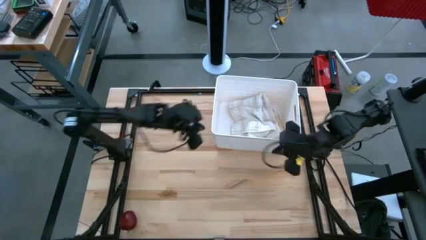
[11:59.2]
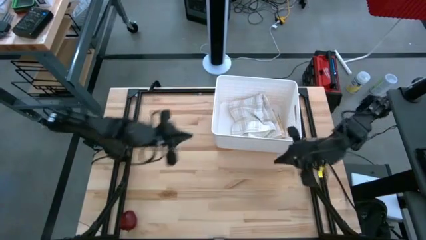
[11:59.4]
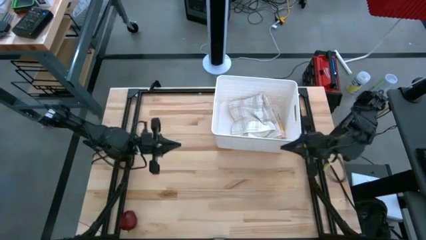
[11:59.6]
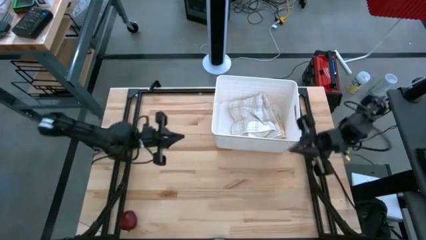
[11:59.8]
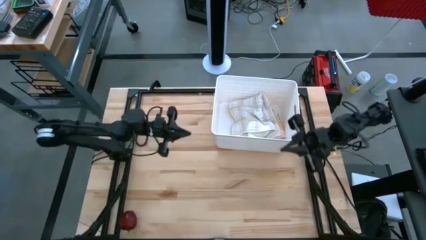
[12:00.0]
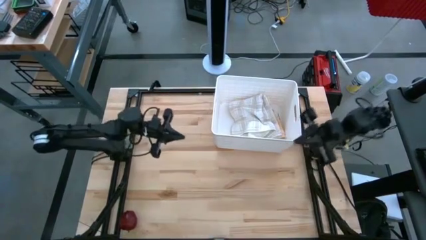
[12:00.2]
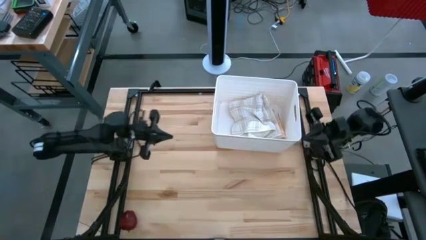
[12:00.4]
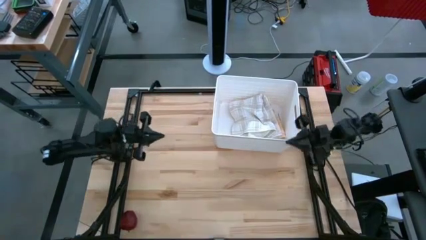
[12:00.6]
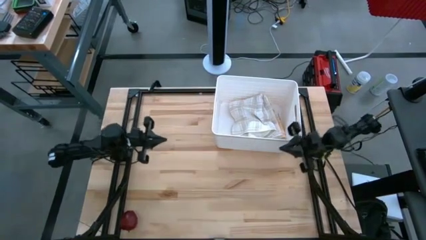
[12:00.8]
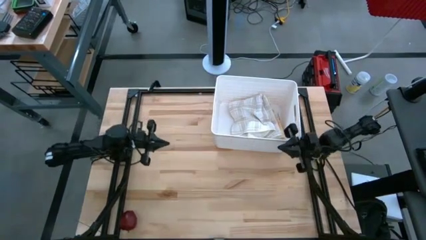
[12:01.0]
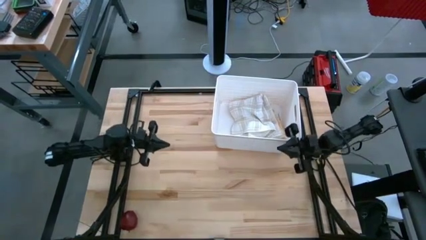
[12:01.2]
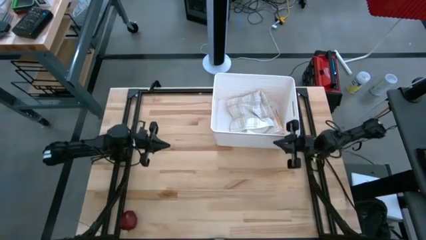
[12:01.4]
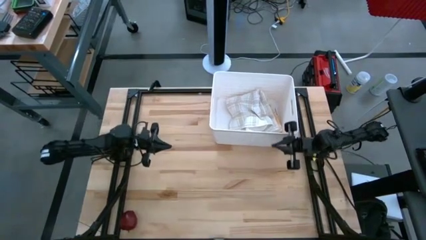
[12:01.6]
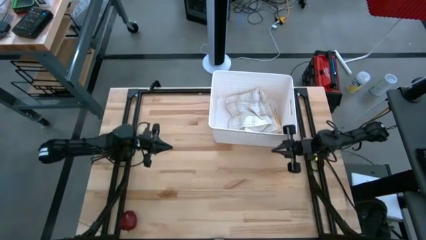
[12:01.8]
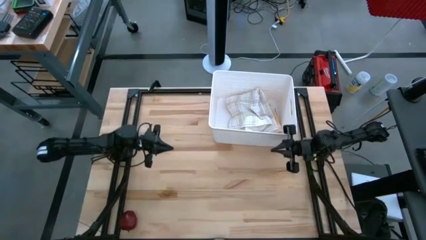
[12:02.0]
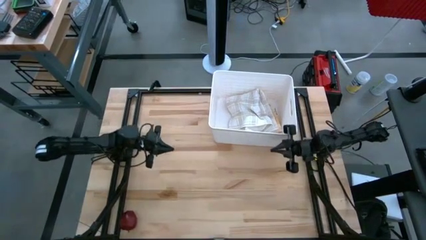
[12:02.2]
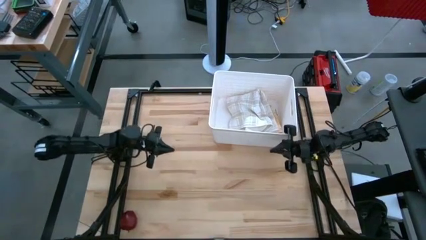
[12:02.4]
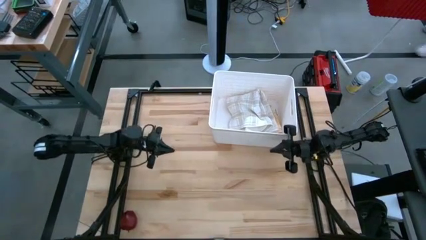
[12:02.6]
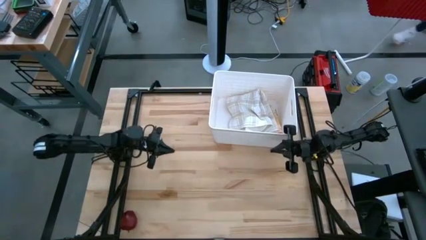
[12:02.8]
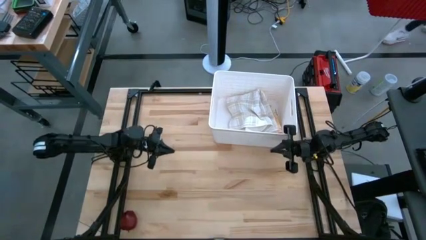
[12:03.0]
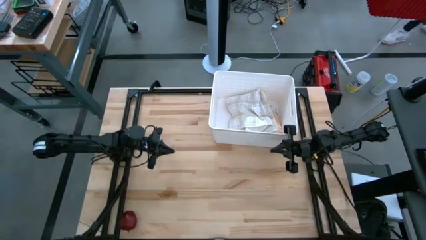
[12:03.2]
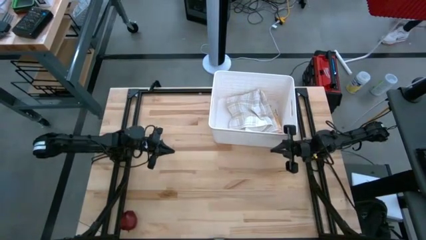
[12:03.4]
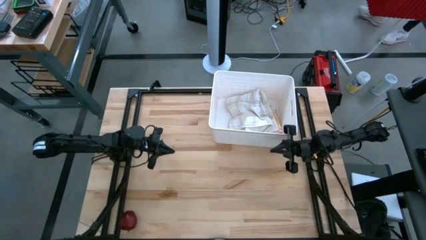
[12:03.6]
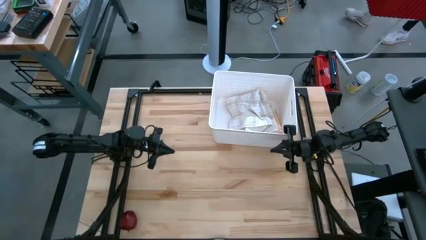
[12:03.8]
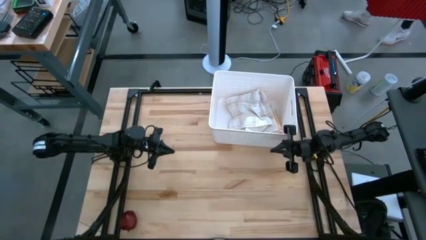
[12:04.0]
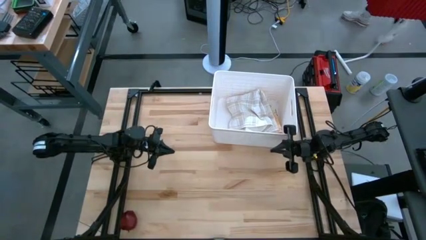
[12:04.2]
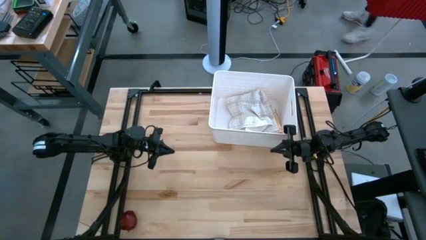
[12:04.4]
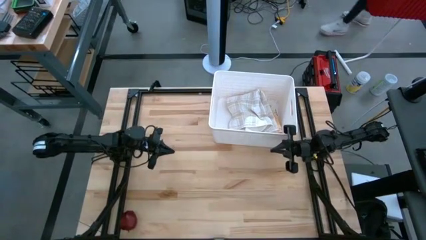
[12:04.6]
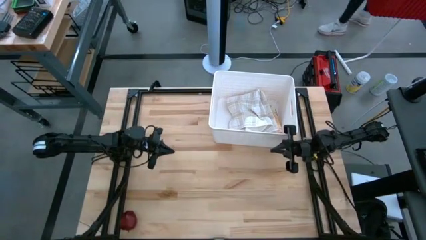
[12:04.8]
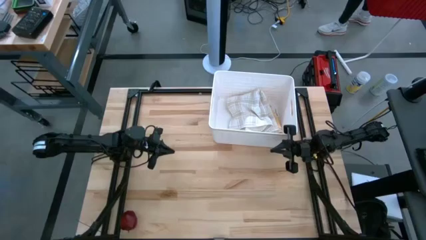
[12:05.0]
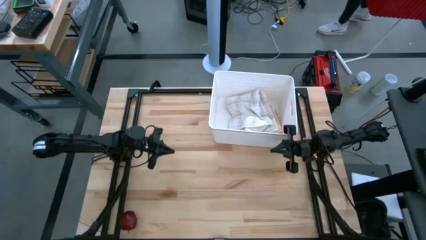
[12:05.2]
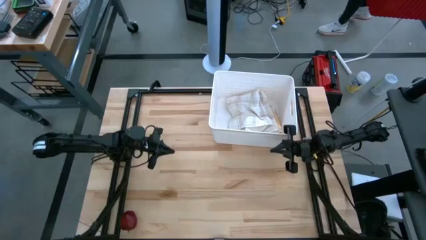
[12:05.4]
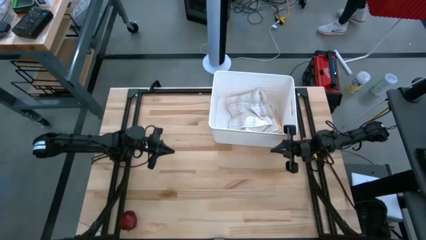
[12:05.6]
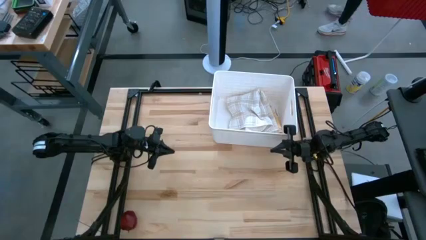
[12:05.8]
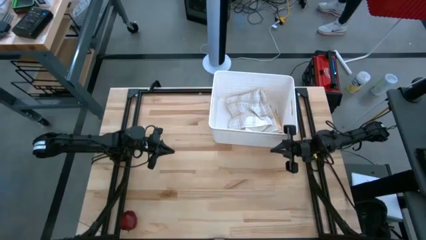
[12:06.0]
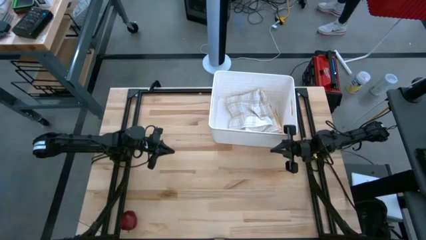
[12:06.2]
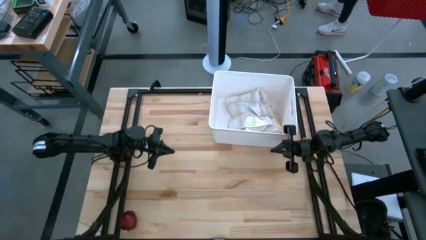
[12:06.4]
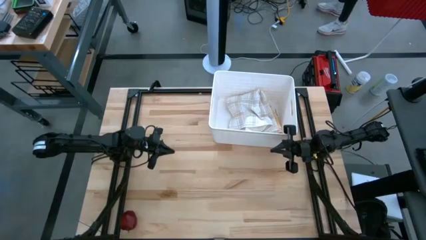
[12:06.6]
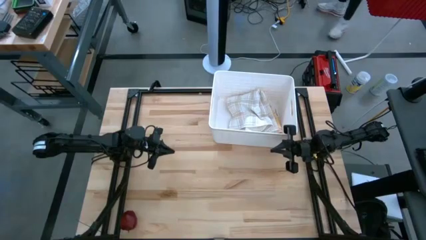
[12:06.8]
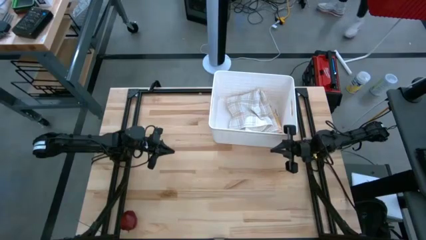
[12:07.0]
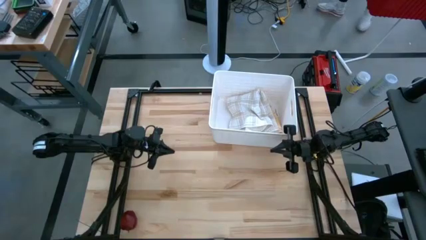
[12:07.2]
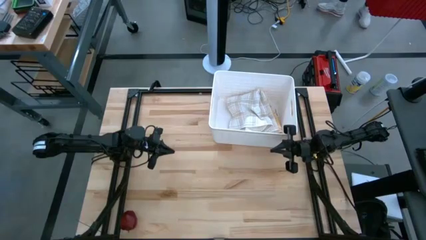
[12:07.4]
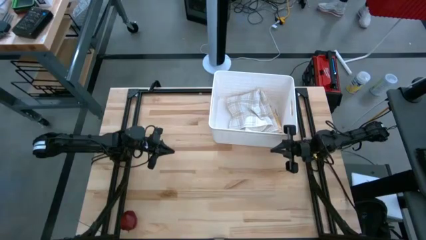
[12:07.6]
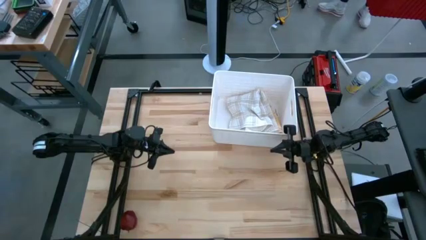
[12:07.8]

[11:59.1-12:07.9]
Task: Fold towel
Return to Home Position

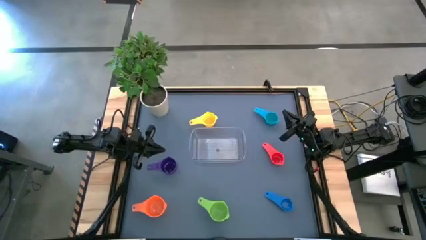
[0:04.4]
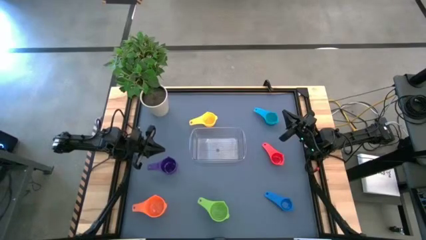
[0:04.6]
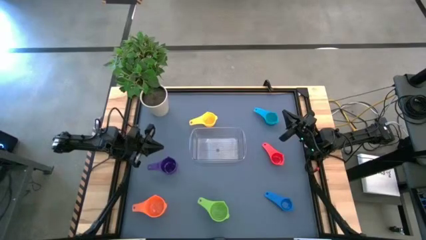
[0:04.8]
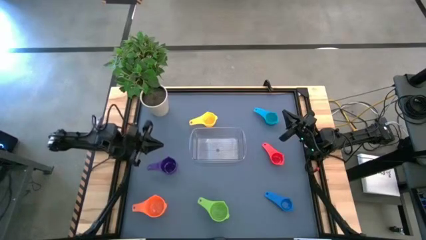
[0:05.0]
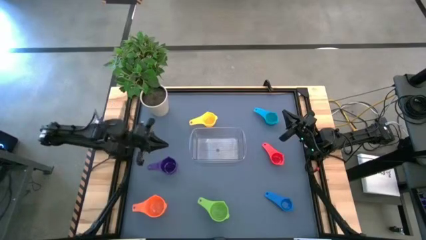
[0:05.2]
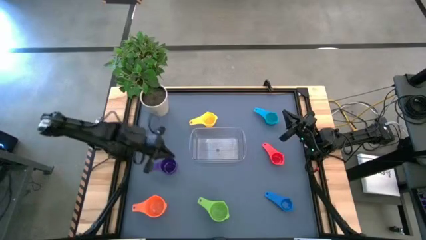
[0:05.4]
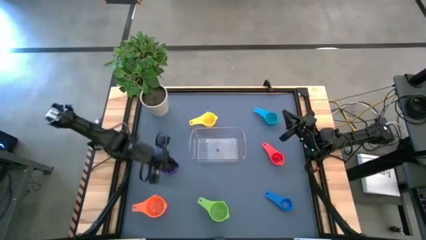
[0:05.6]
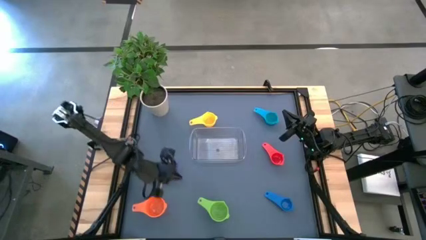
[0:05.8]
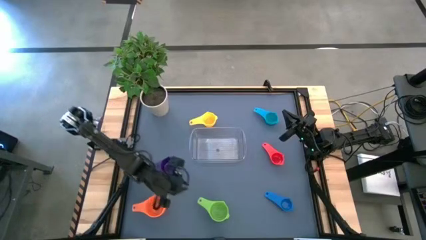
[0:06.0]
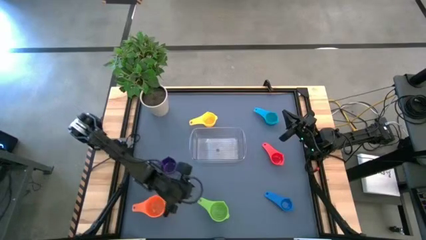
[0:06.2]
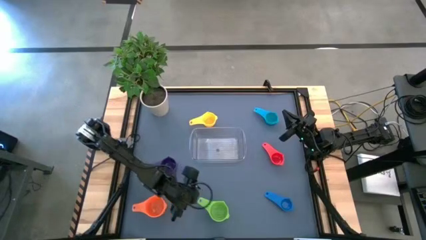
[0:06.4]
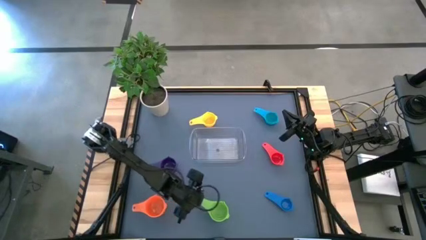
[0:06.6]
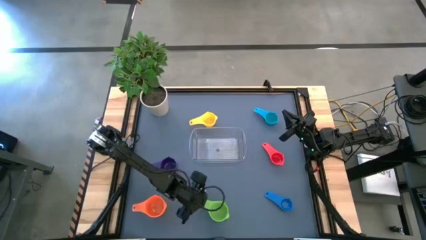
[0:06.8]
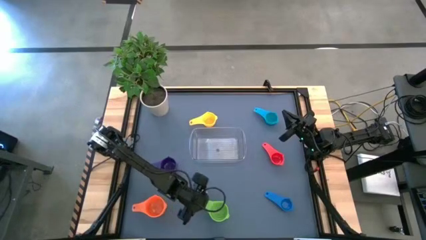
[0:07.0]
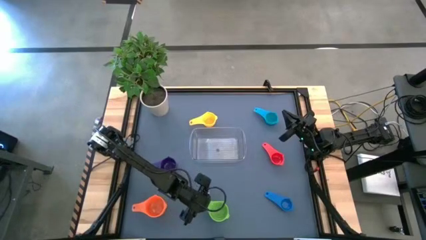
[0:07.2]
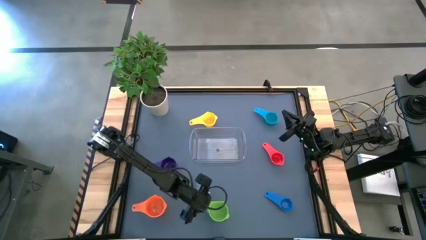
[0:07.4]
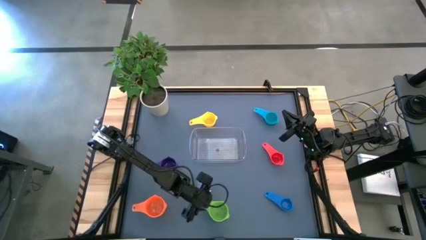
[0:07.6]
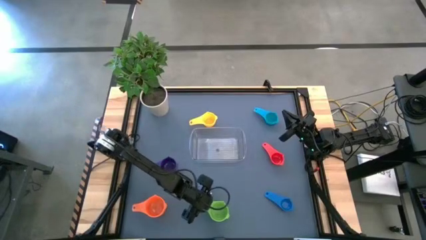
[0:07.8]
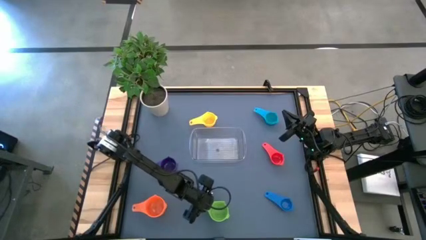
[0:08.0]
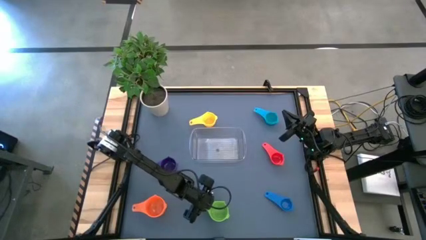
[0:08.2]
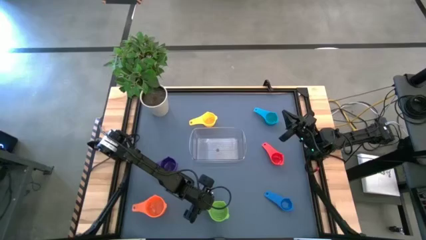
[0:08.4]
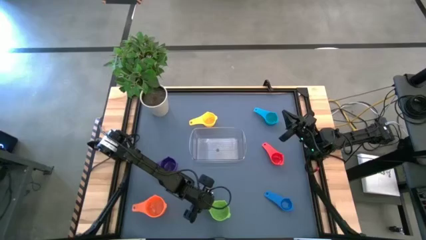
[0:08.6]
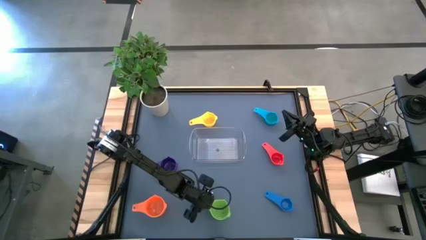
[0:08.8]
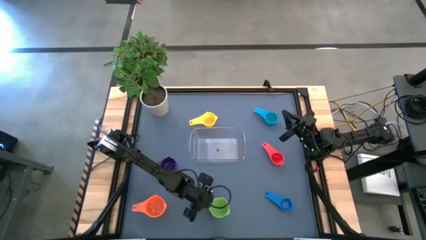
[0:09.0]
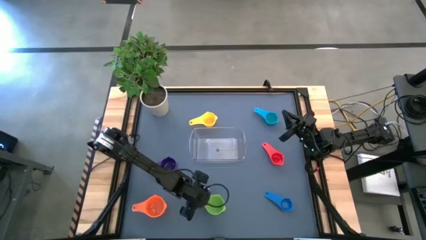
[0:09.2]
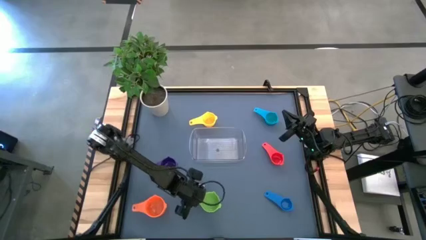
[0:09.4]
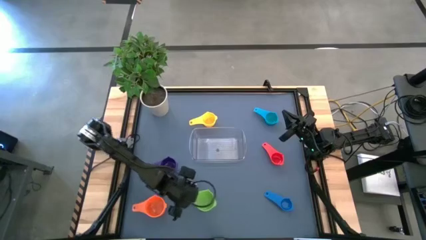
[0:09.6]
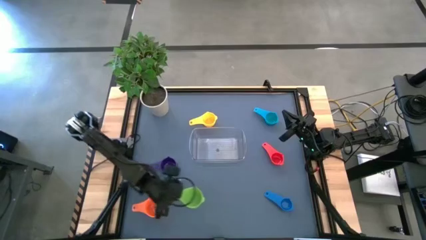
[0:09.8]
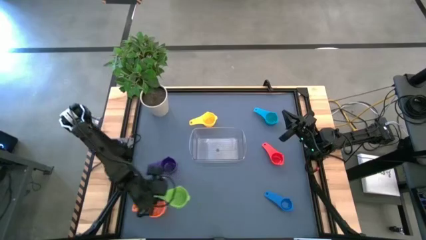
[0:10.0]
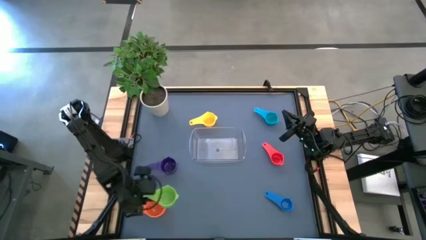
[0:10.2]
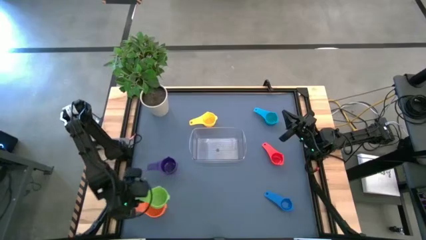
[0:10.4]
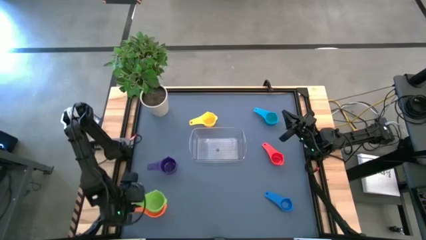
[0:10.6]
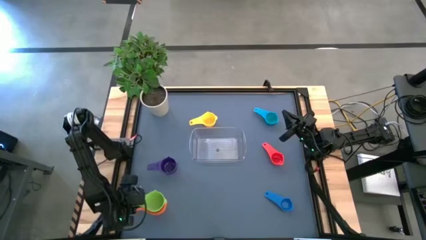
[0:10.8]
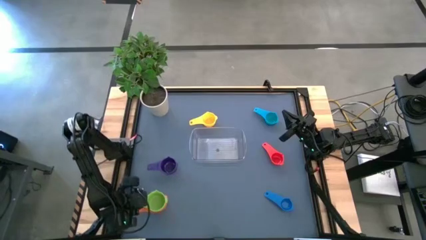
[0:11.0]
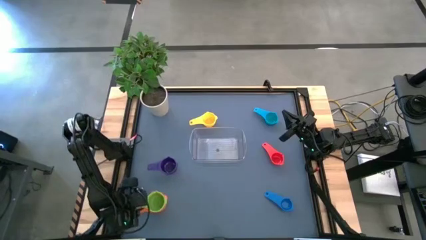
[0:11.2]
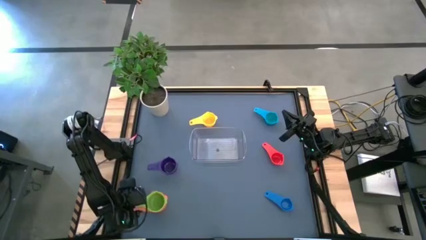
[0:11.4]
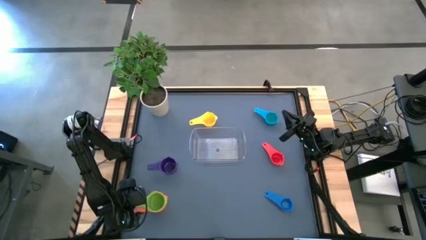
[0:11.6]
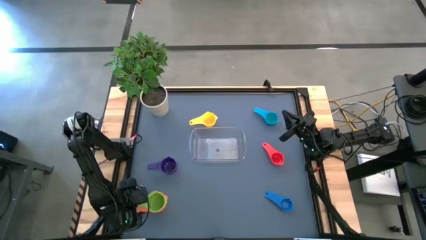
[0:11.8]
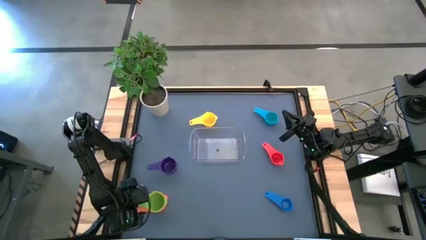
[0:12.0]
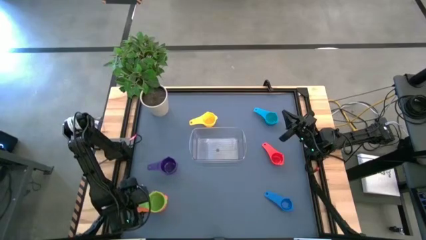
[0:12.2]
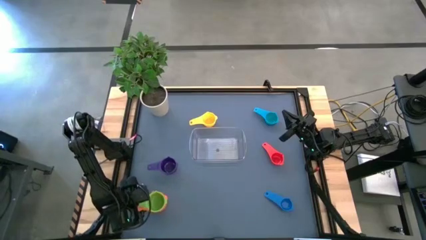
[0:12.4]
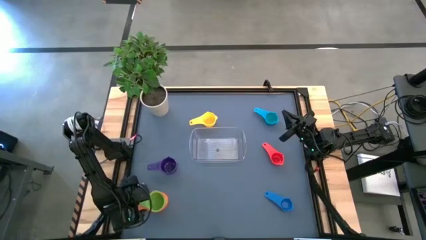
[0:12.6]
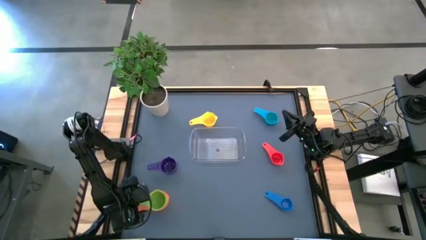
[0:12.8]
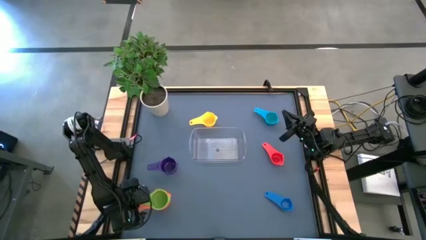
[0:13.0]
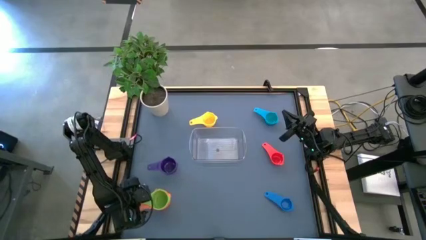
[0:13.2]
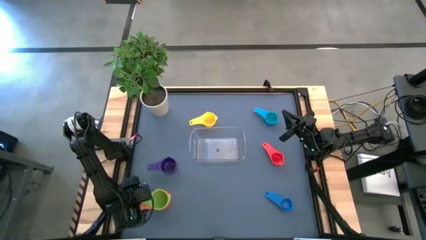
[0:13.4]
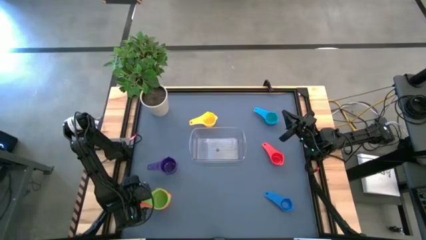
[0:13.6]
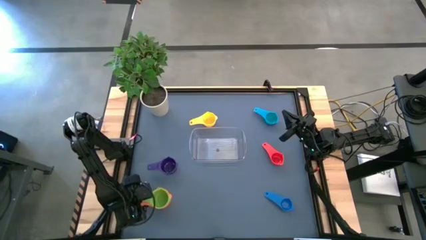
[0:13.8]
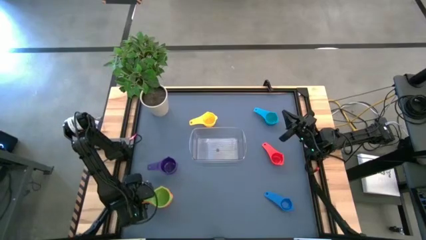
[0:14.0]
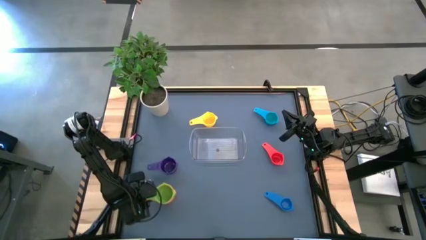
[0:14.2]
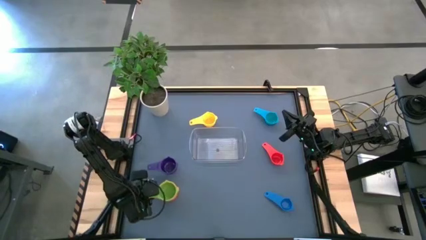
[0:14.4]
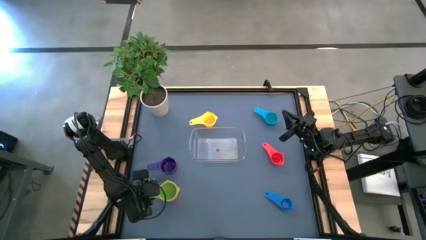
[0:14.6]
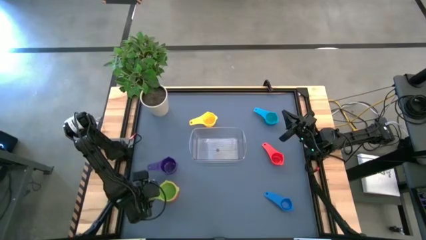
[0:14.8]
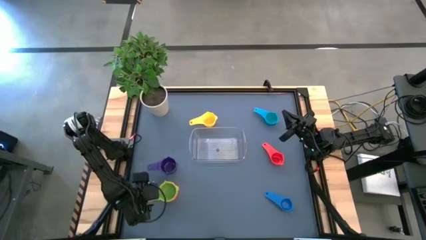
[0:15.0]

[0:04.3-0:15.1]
Task: Nest measuring cups in basket
Stack the green measuring cup on top of the orange measuring cup
